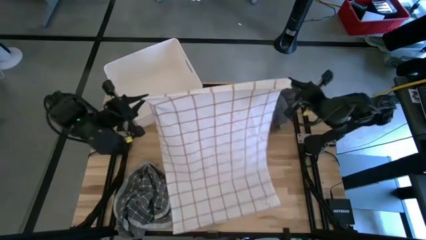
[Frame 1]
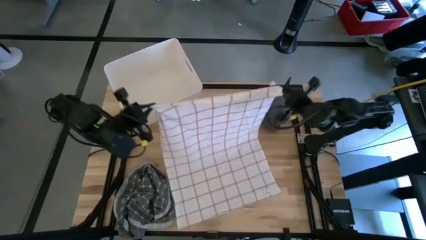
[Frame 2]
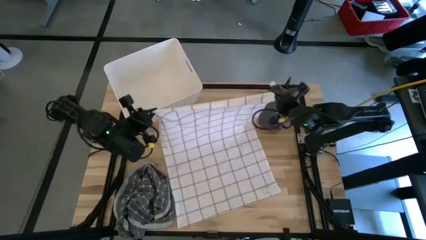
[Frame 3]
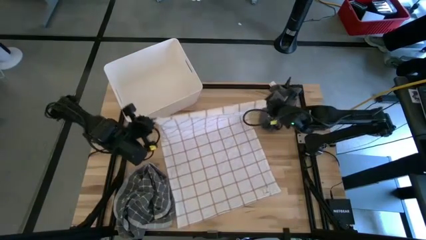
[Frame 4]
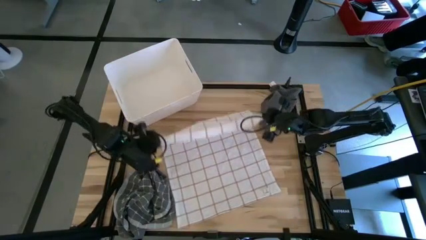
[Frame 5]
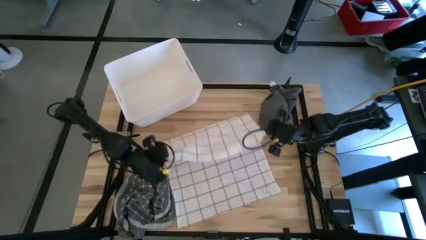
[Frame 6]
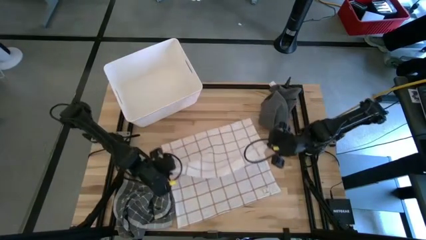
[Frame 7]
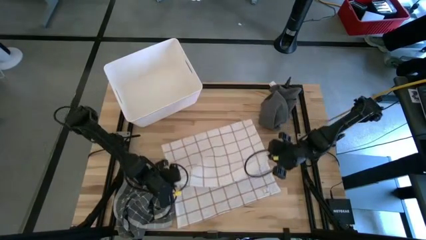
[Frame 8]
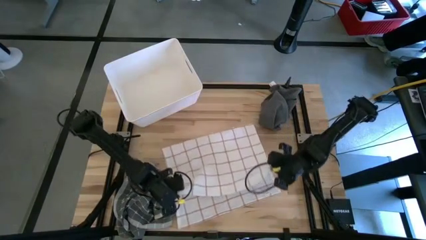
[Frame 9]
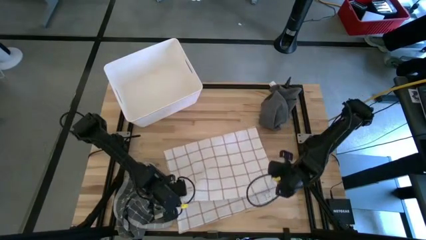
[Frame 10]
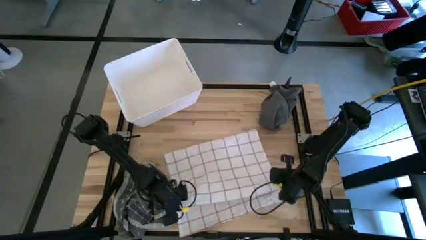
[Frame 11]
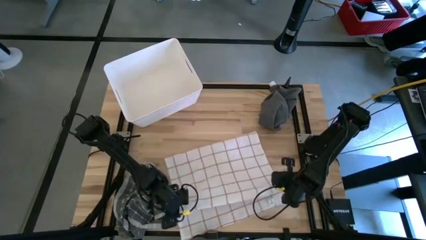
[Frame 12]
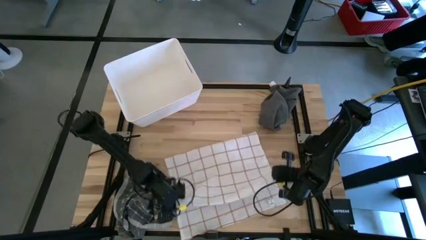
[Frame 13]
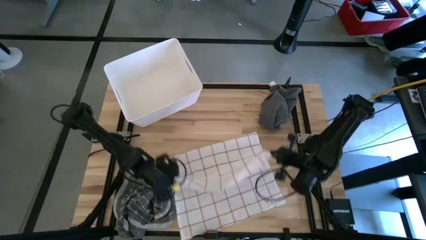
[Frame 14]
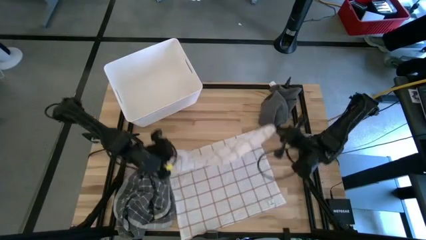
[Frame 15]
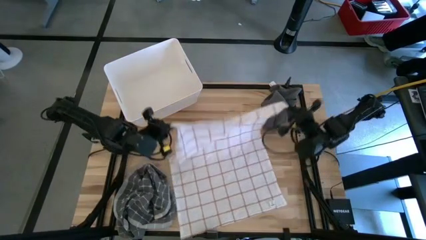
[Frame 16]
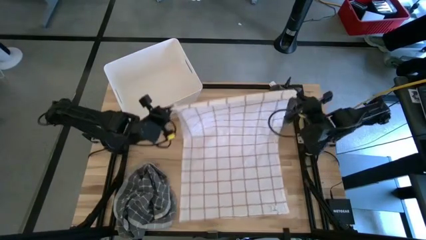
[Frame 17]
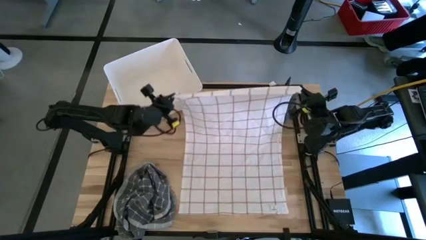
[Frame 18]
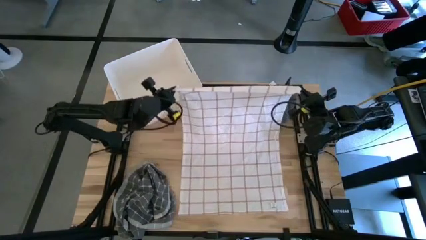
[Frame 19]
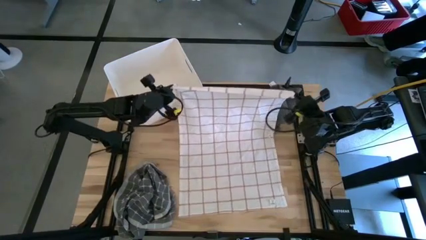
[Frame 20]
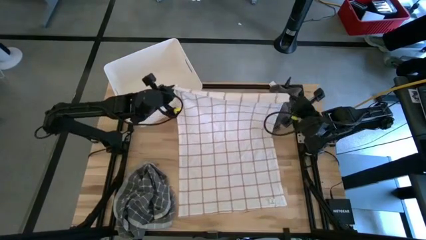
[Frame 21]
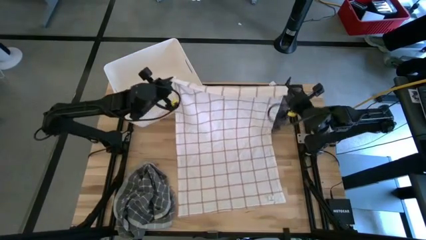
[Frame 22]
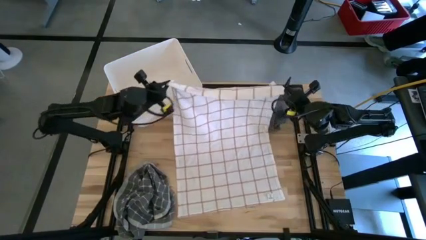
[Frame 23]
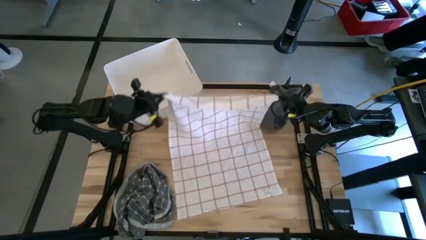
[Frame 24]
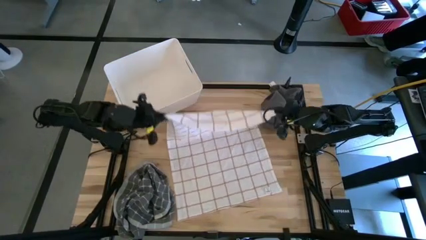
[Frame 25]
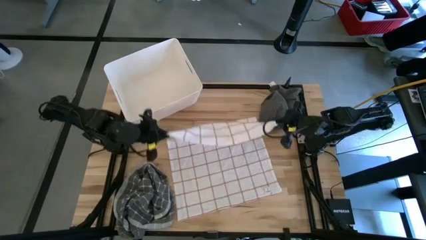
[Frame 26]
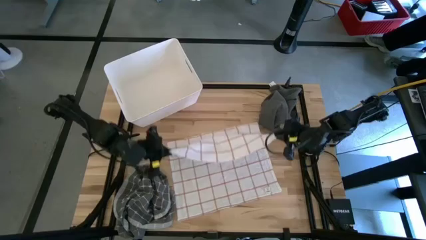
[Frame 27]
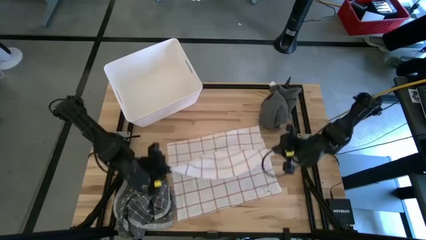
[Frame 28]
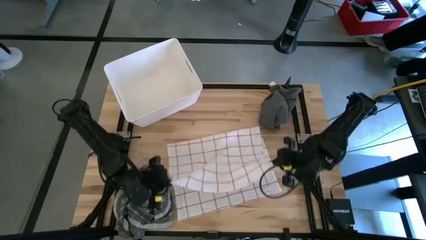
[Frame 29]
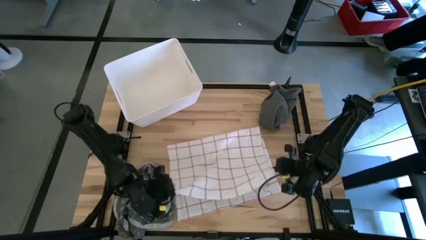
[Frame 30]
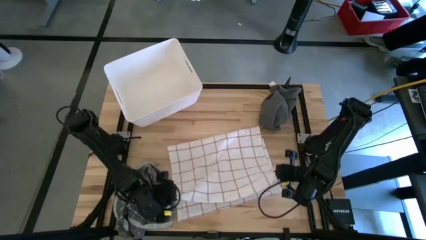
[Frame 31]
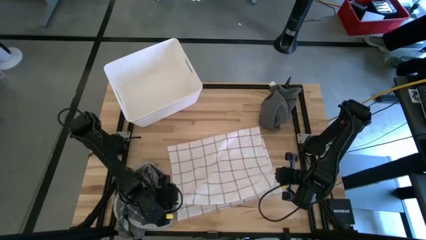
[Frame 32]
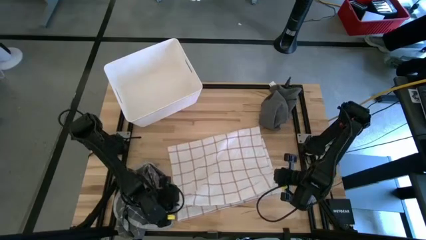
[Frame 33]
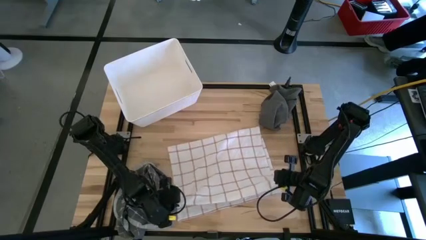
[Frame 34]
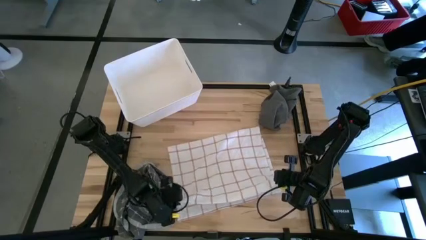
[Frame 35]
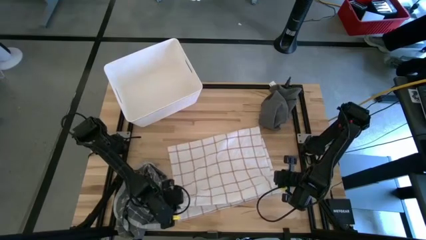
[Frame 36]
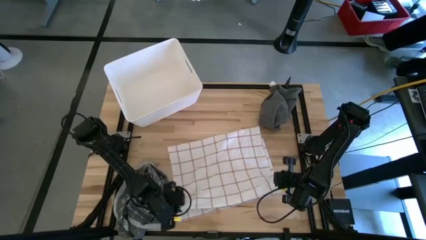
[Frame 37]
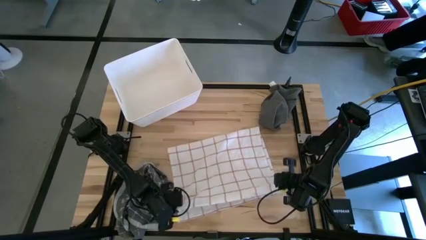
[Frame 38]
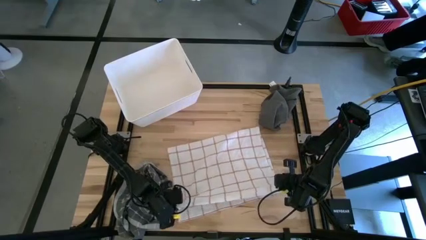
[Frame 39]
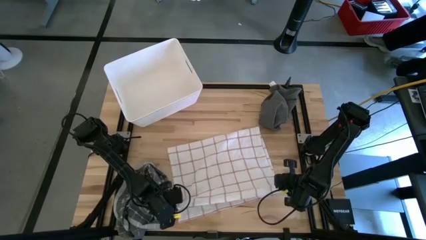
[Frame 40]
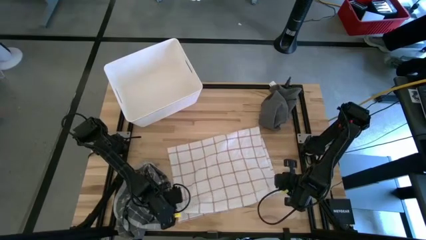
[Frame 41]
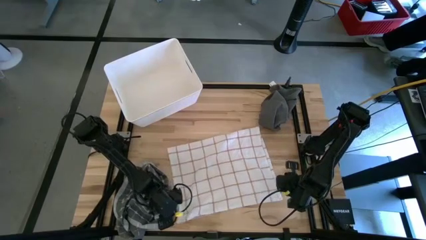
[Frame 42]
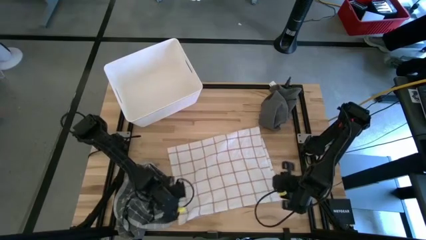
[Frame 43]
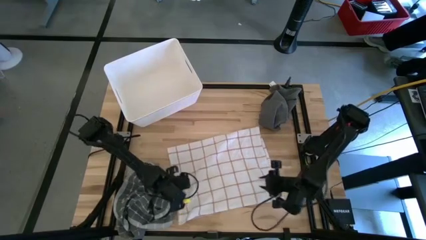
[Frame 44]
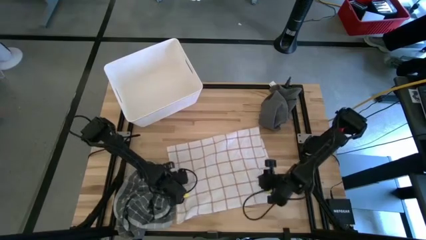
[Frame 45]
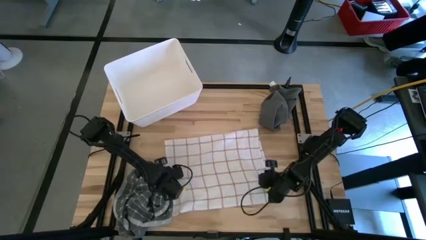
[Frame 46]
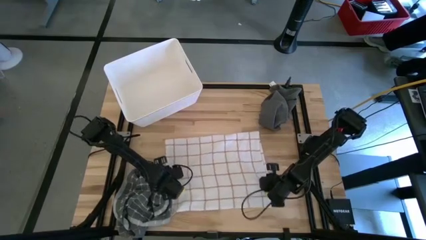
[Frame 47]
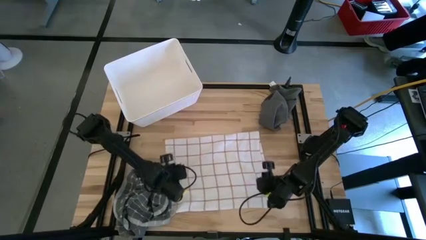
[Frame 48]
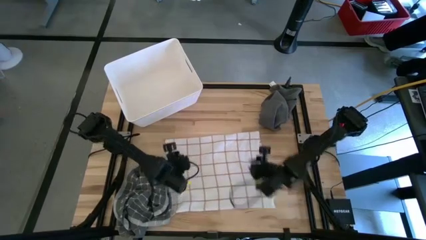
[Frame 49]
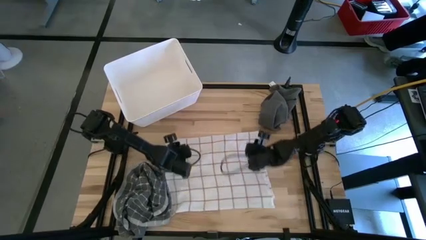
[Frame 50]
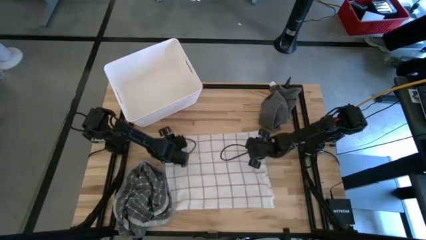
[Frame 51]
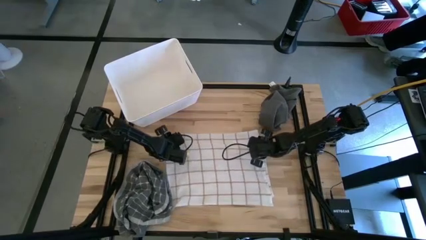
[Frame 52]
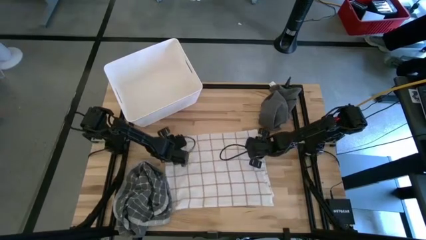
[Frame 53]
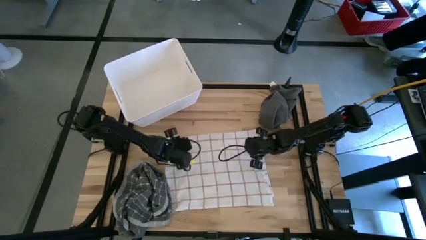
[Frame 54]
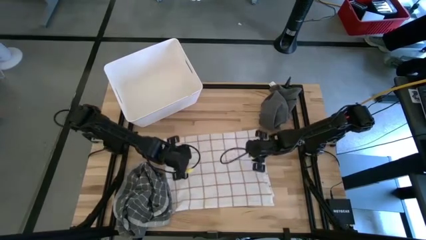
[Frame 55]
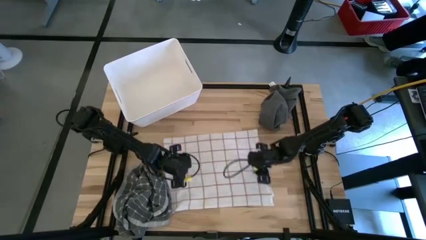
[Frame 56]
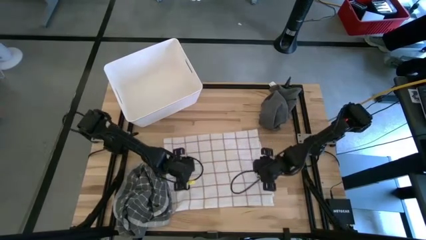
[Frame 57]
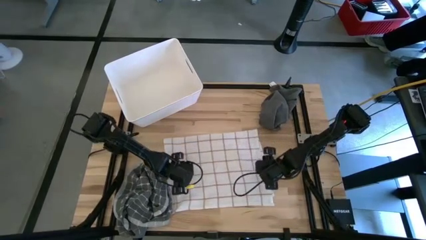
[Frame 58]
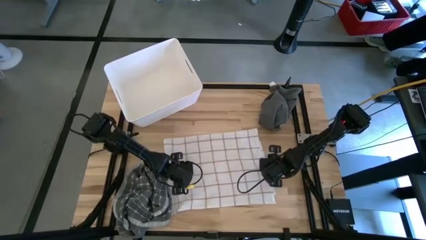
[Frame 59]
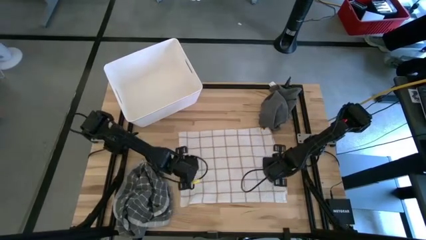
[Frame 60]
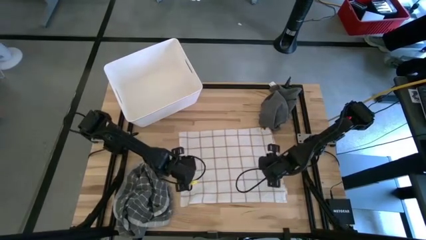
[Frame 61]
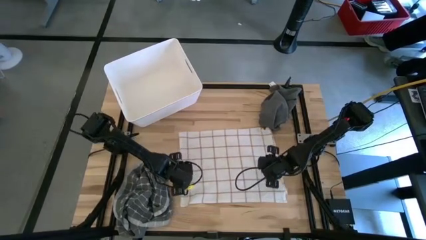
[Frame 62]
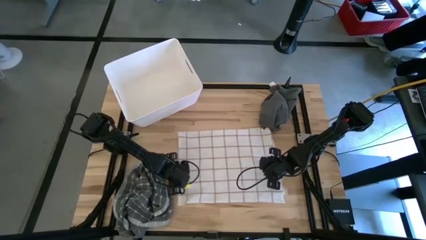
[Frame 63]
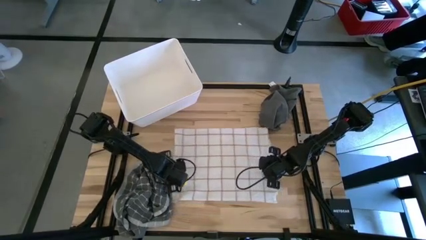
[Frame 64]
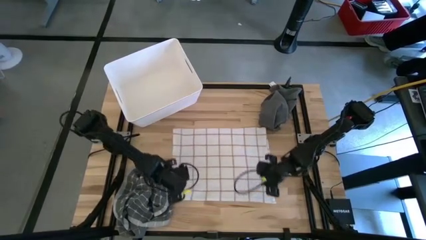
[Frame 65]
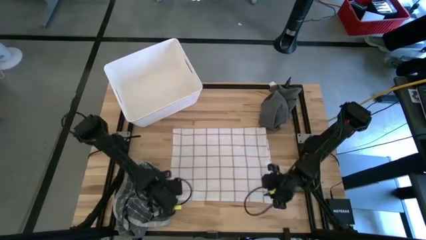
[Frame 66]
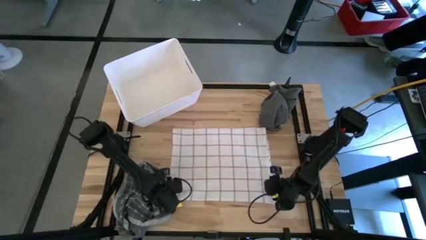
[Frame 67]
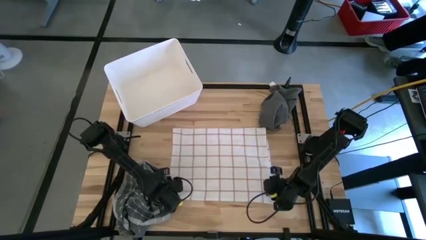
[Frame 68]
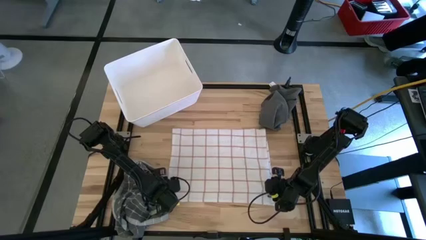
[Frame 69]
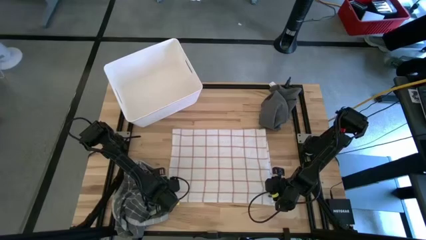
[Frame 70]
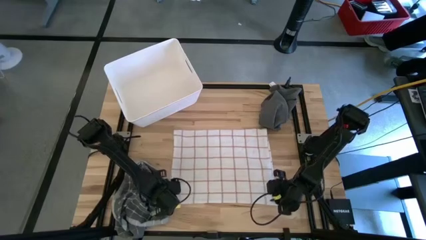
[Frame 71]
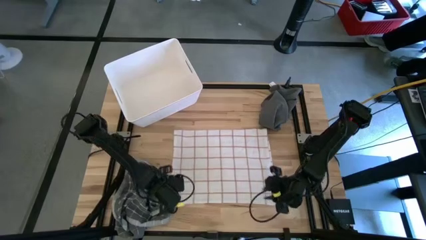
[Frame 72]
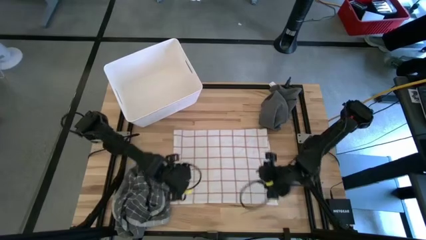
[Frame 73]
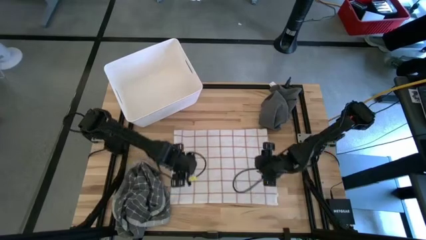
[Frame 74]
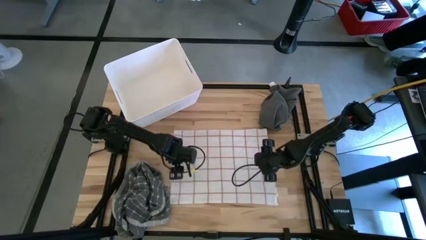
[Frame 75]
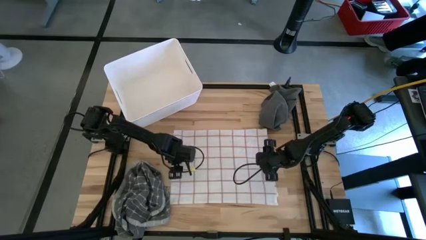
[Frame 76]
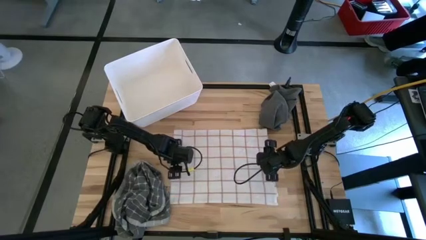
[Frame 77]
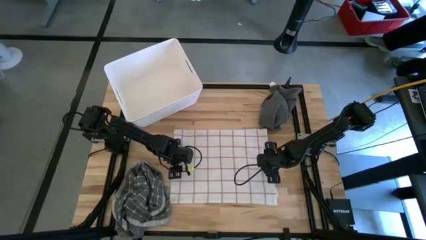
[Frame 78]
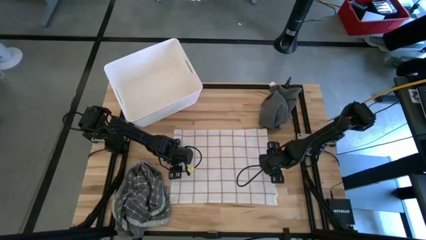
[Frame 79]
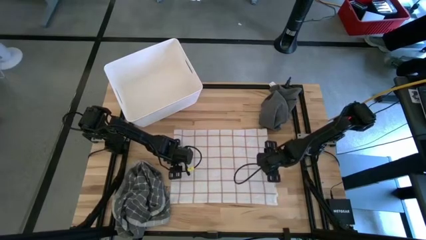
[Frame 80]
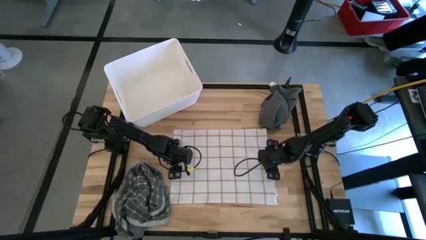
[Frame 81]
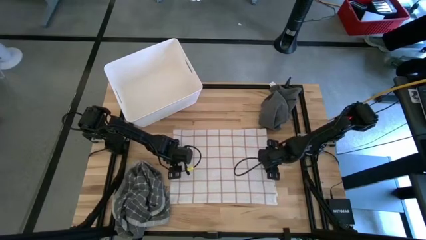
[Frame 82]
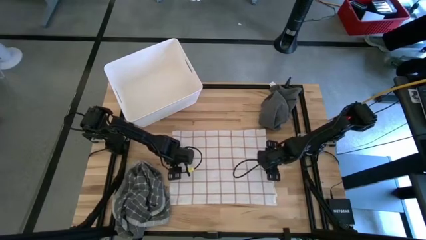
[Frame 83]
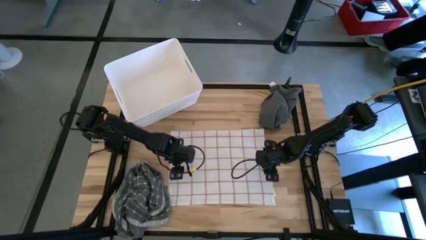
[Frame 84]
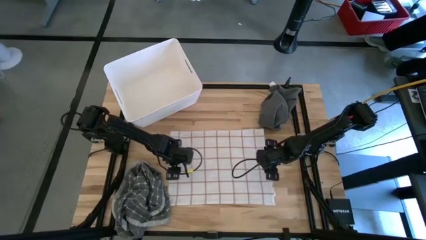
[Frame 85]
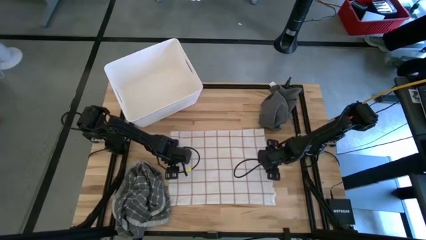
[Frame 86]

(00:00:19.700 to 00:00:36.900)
Task: Fold towel
Fold the brown-white towel
